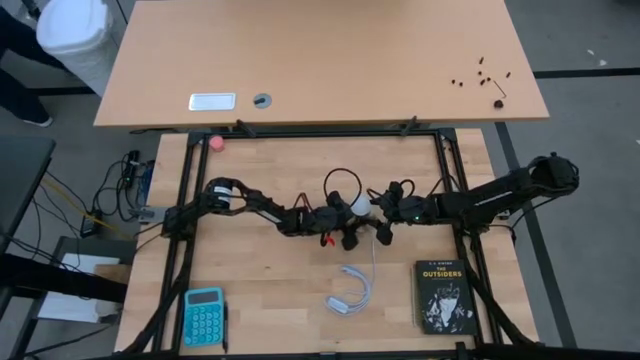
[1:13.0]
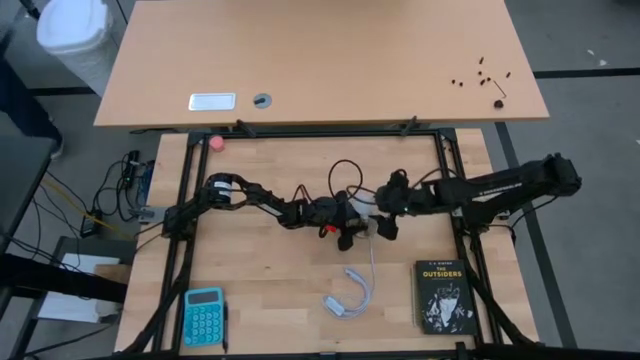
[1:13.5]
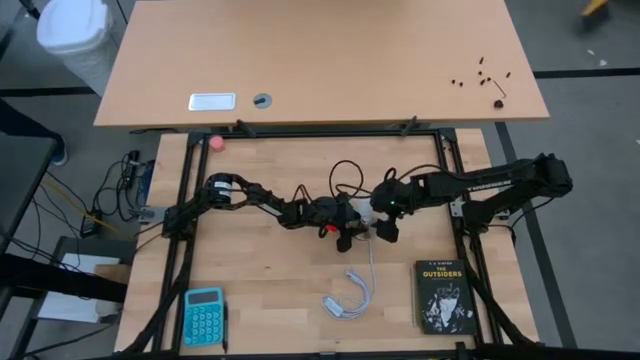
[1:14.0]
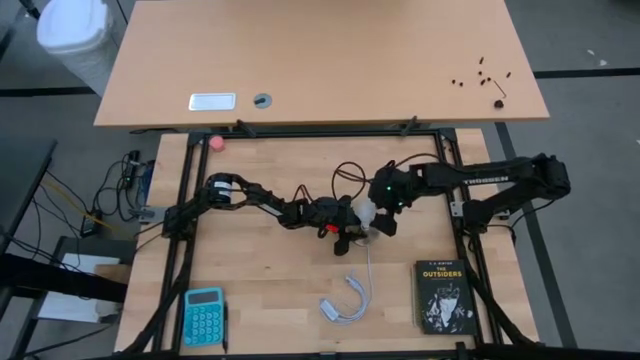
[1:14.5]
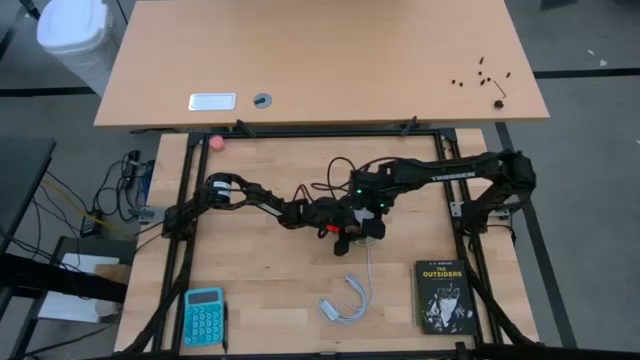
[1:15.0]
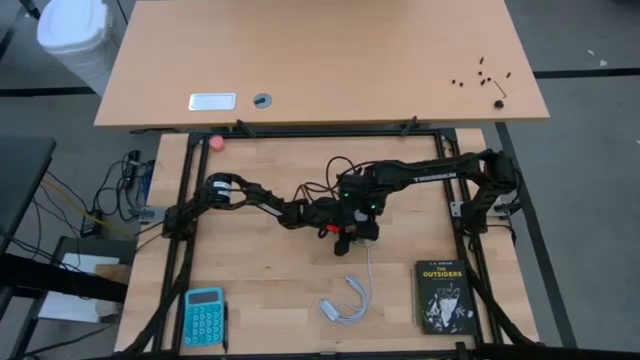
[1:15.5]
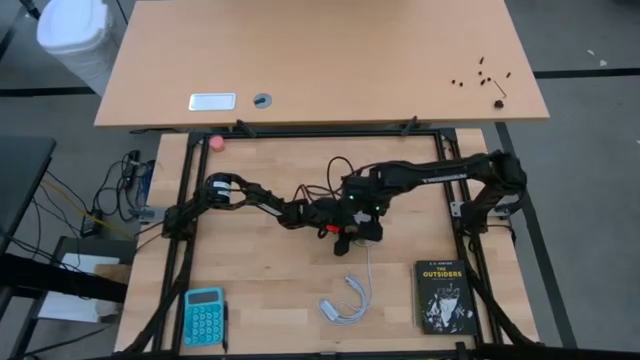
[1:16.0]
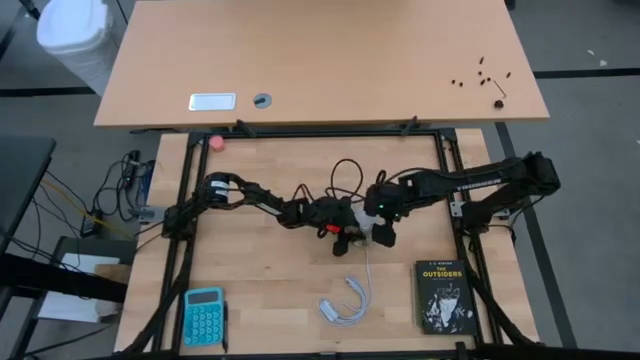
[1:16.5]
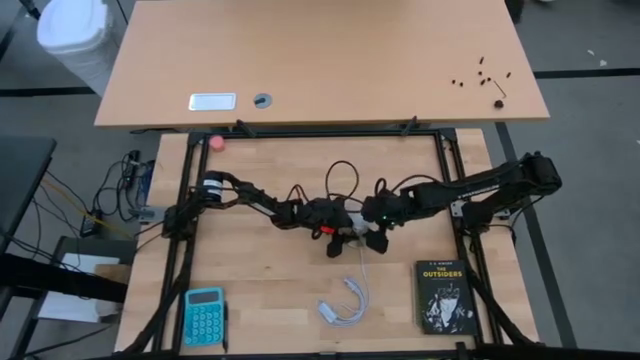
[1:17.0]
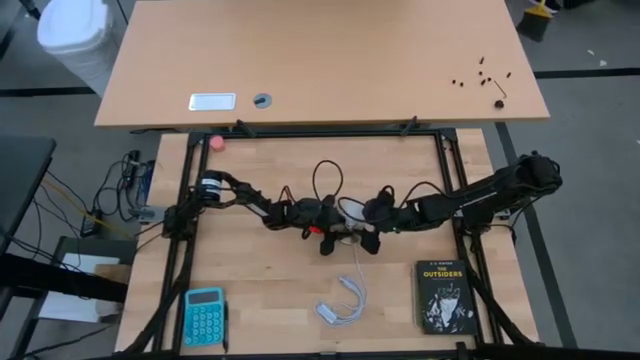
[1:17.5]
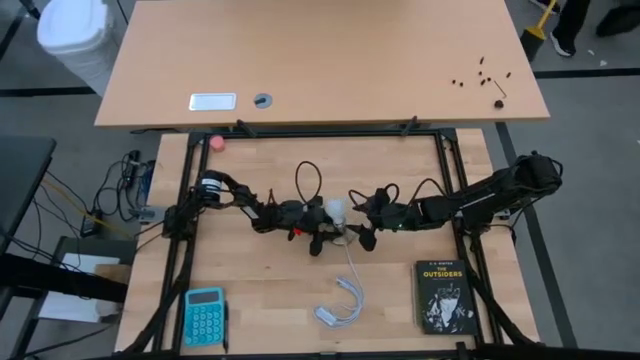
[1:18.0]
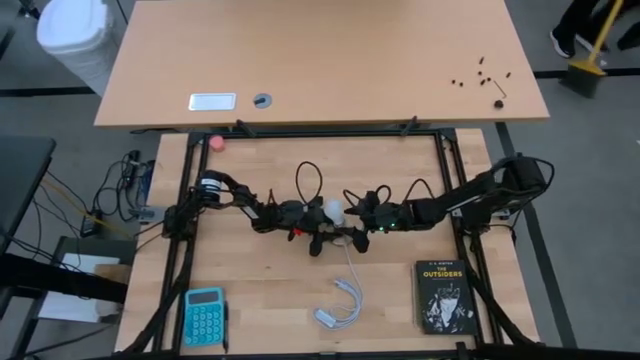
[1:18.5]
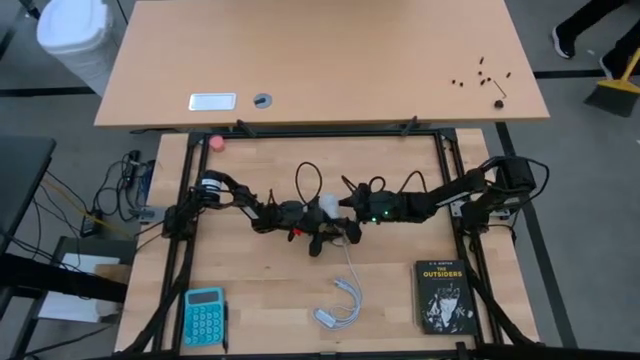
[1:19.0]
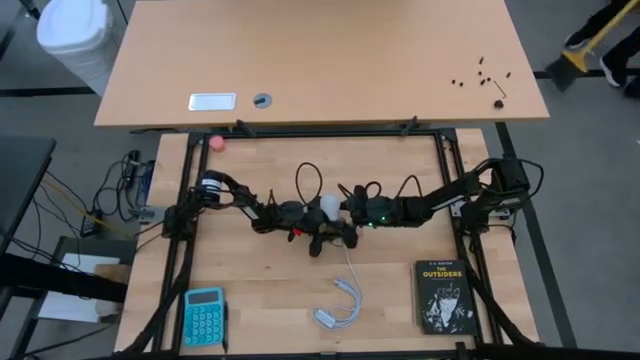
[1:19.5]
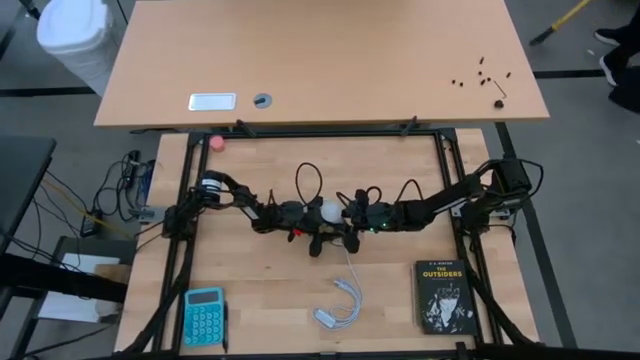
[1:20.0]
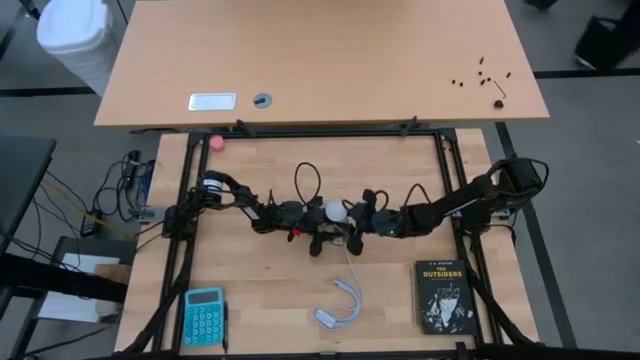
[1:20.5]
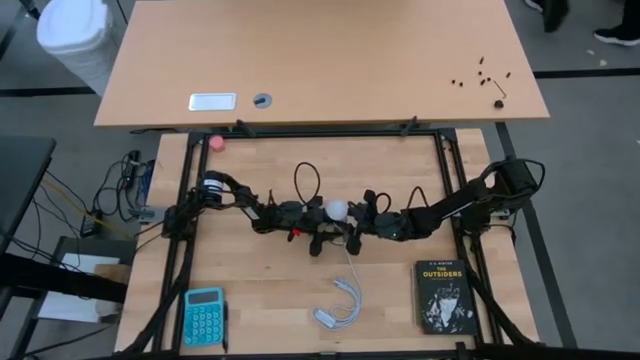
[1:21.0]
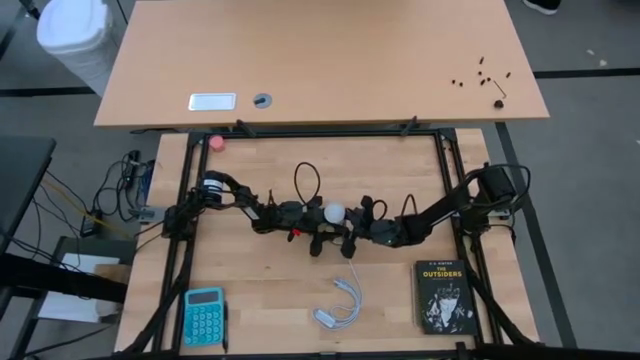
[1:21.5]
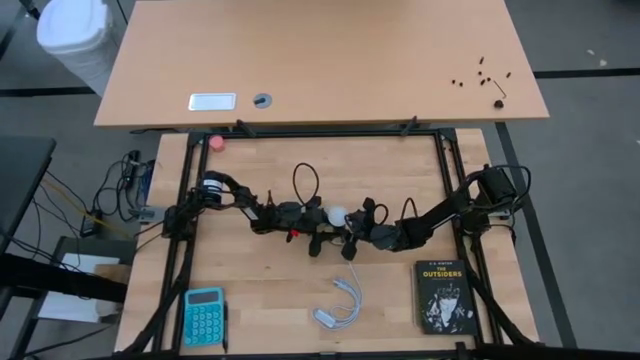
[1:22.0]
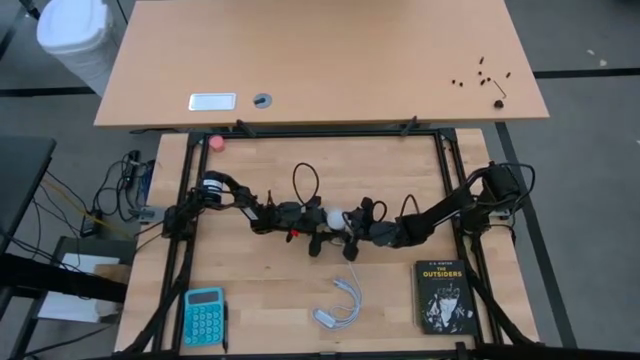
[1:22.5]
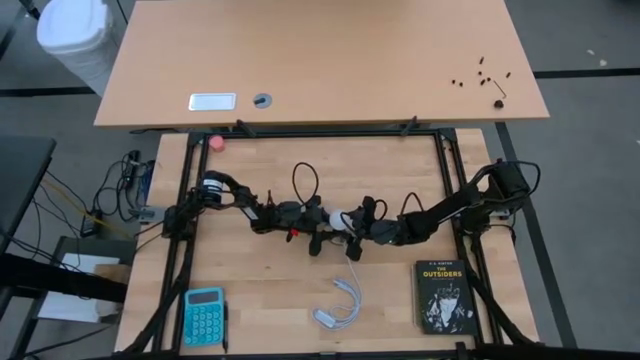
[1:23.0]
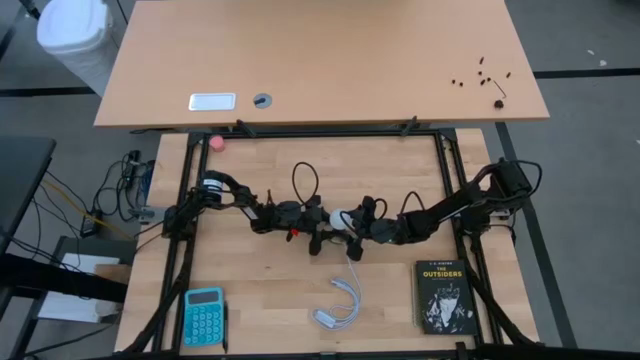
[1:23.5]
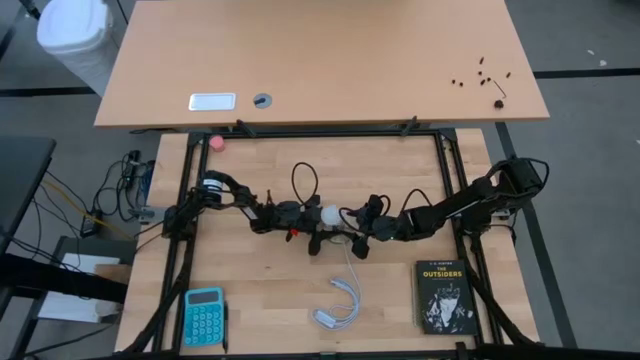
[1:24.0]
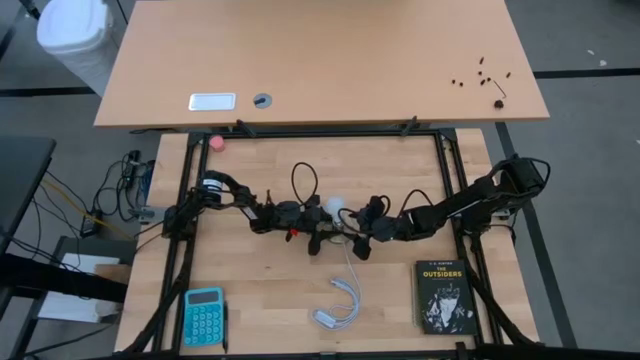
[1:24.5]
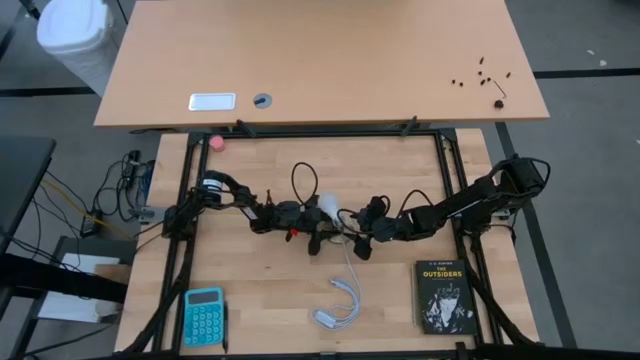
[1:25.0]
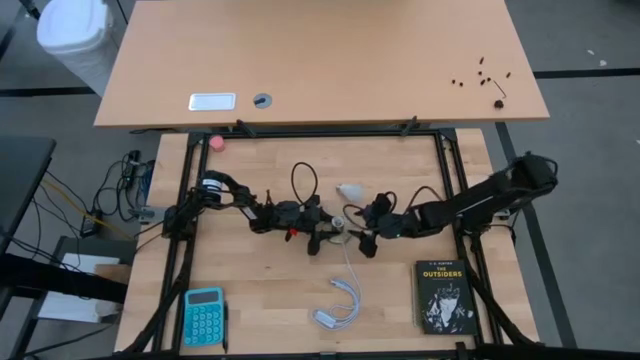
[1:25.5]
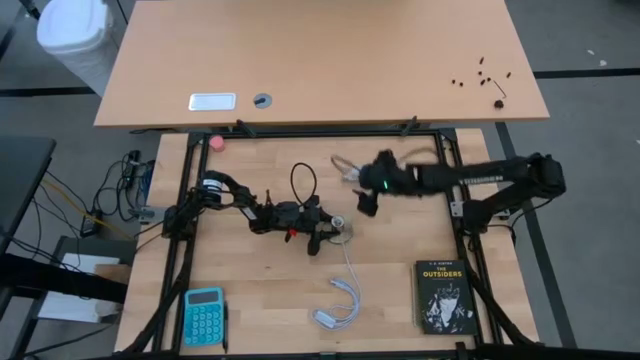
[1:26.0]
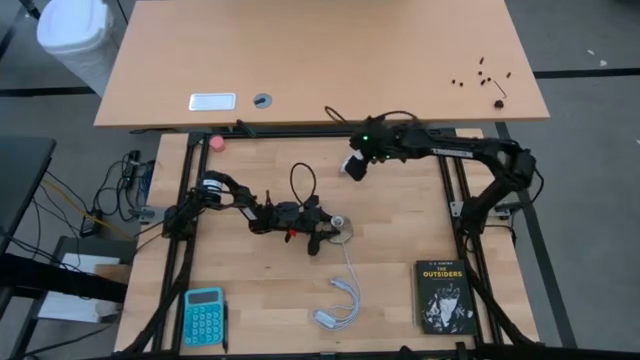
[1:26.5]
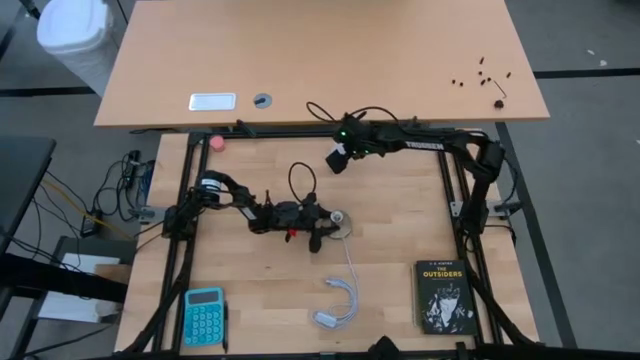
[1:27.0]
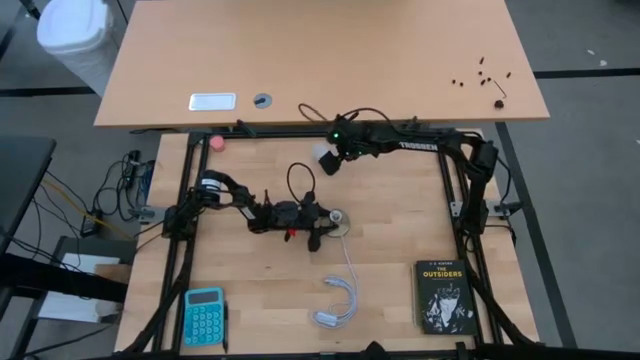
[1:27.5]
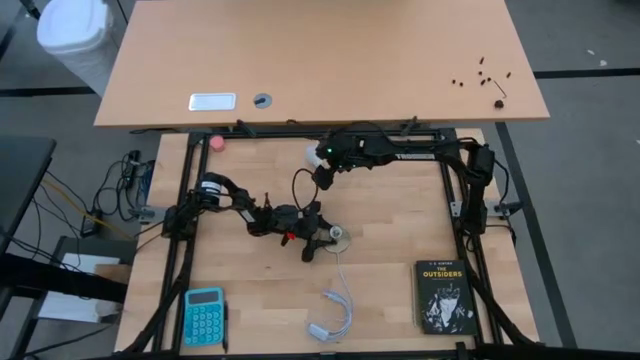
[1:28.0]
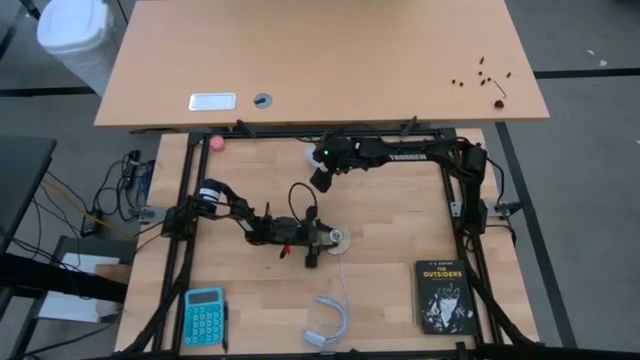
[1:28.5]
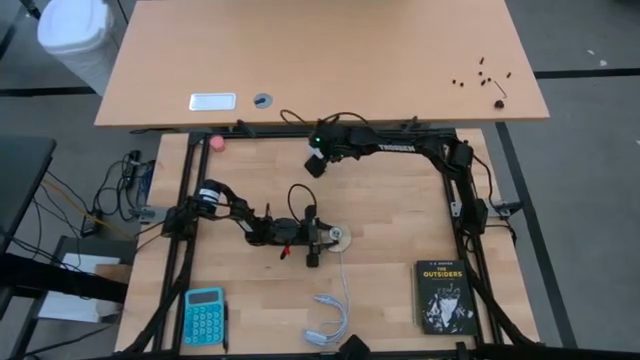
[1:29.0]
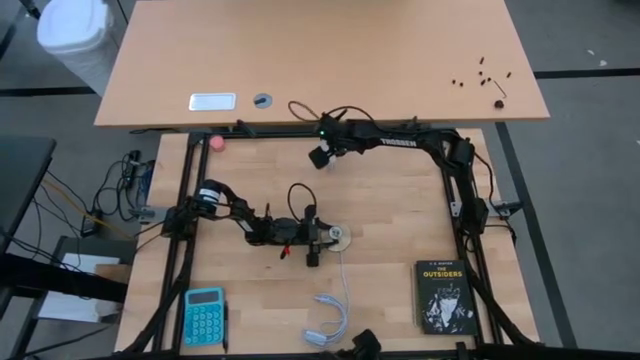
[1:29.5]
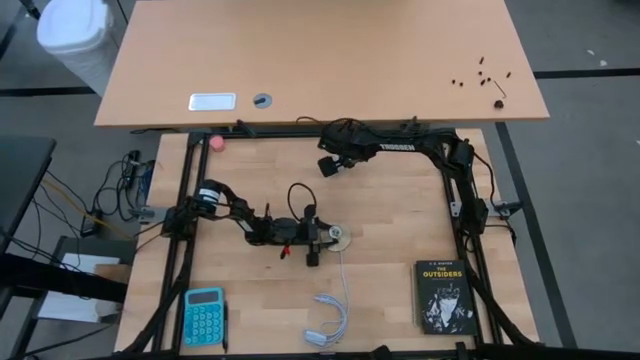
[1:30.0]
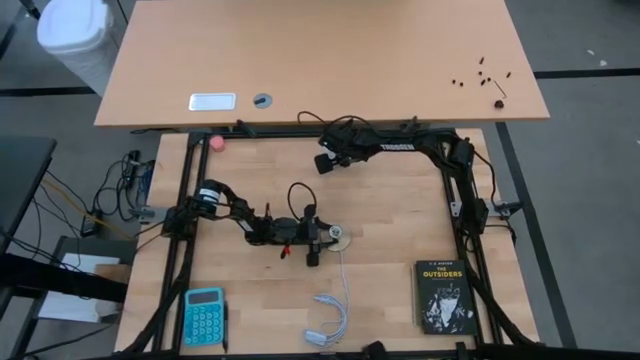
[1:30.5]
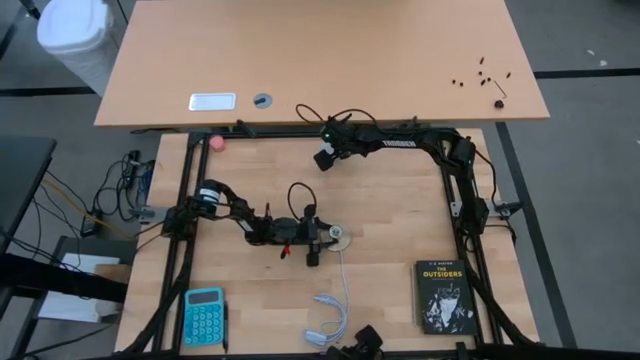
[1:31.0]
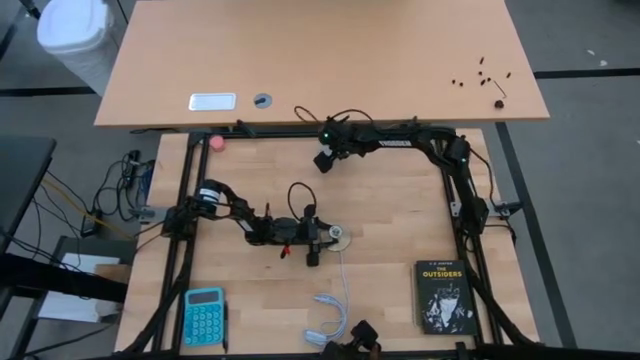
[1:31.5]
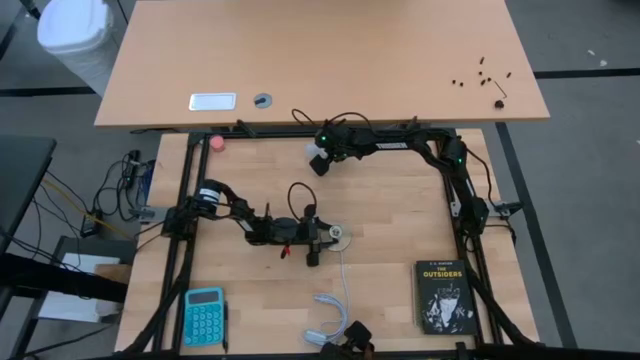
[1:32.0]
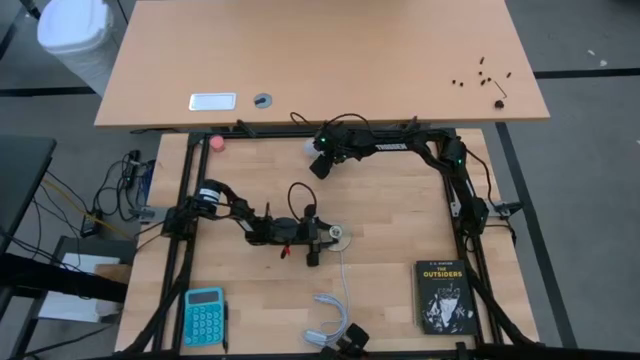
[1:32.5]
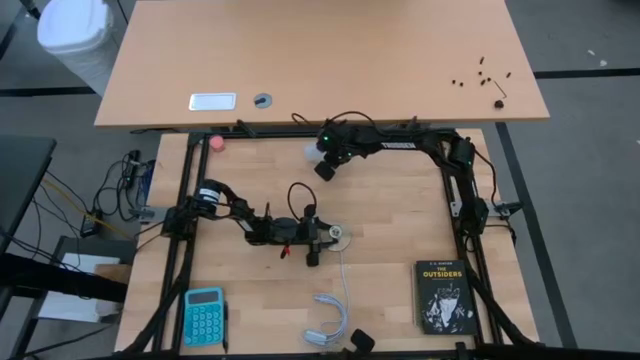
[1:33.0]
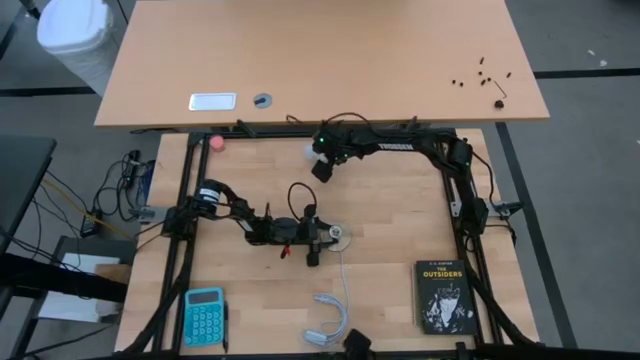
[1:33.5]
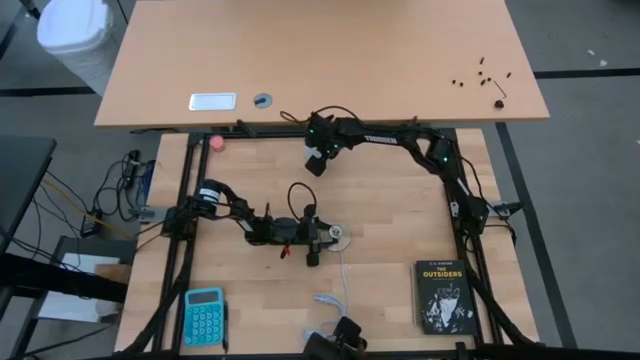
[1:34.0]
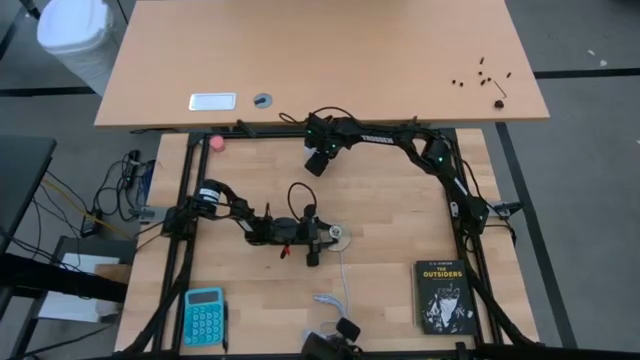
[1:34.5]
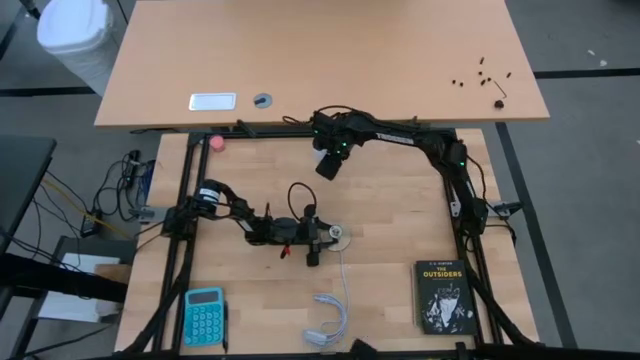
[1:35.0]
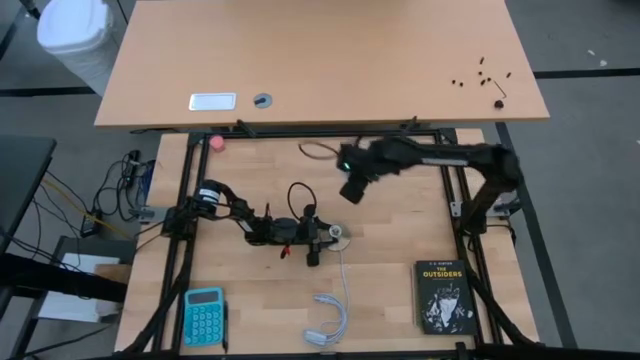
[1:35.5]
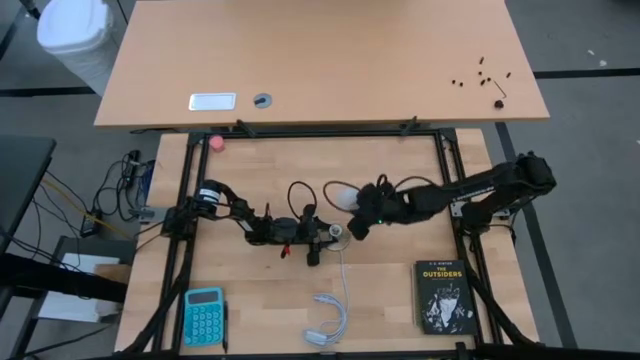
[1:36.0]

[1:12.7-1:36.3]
Task: Screw lightbulb
Insert the white lightbulb into the silver lamp
